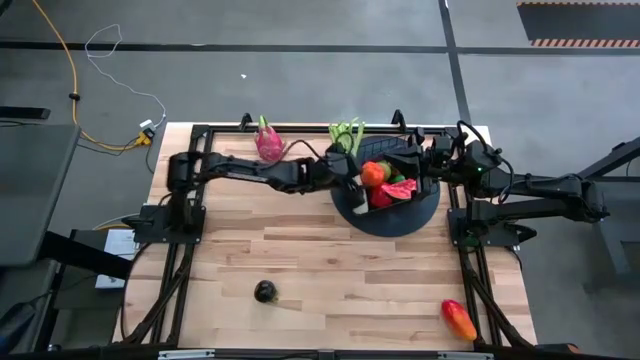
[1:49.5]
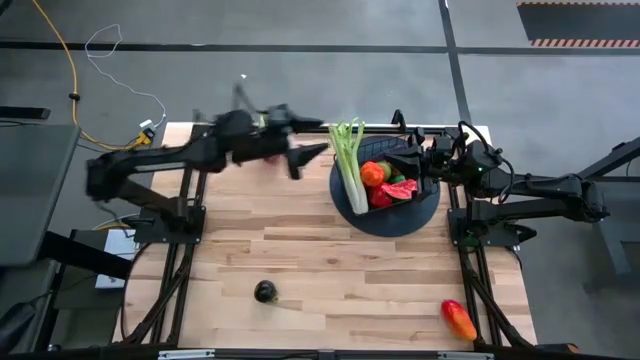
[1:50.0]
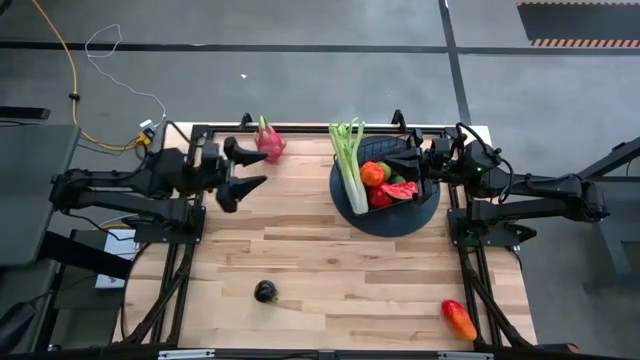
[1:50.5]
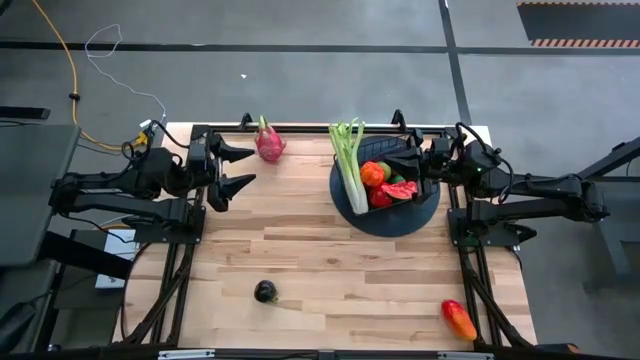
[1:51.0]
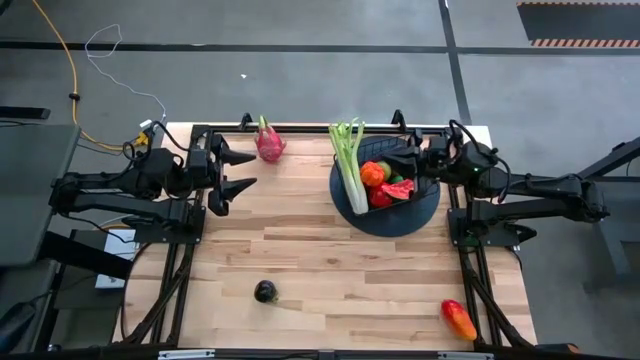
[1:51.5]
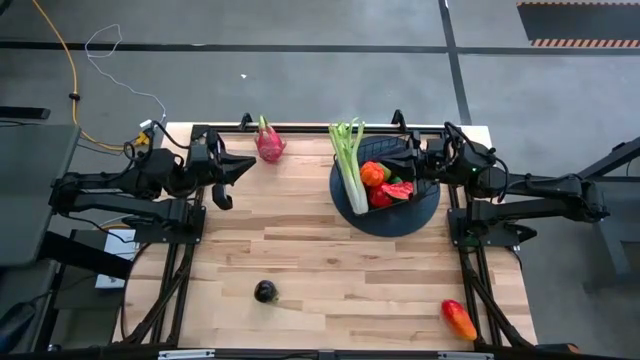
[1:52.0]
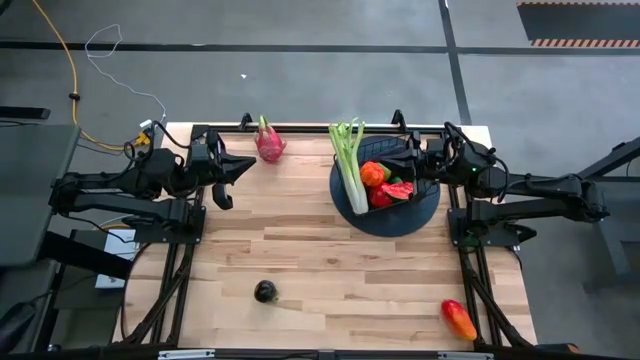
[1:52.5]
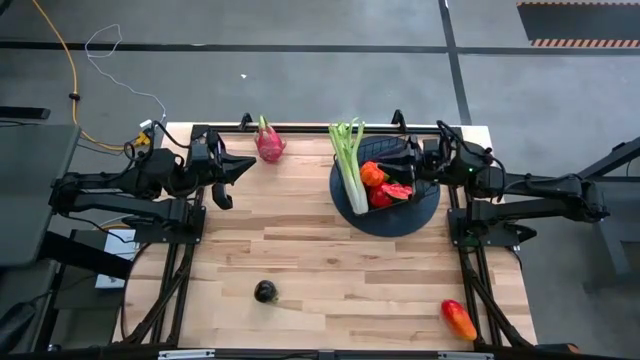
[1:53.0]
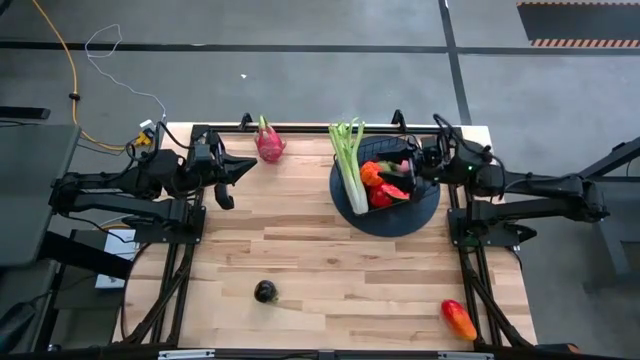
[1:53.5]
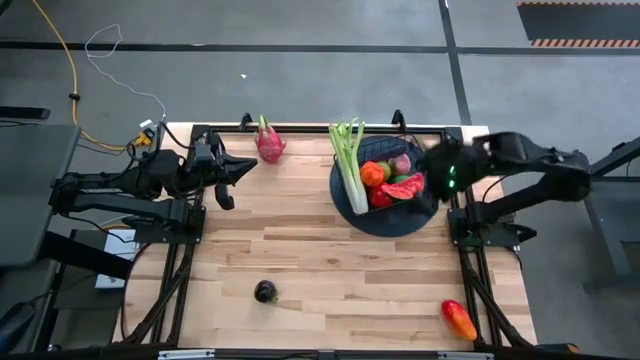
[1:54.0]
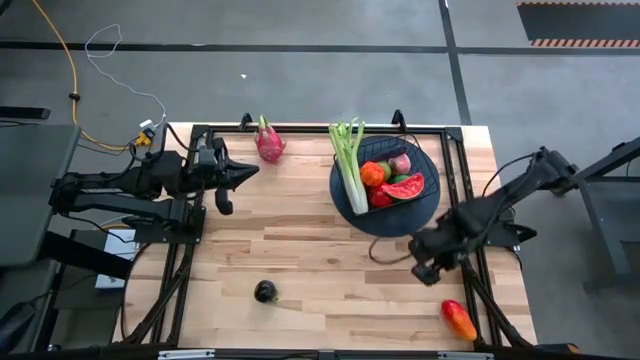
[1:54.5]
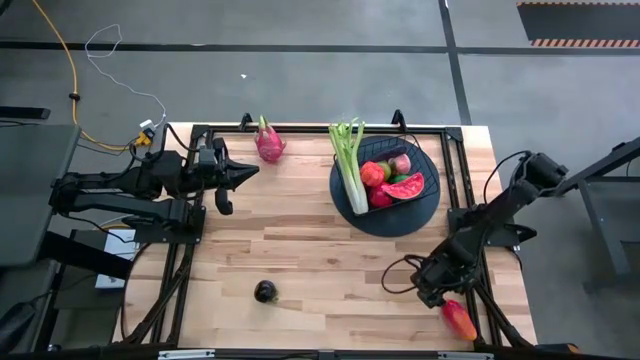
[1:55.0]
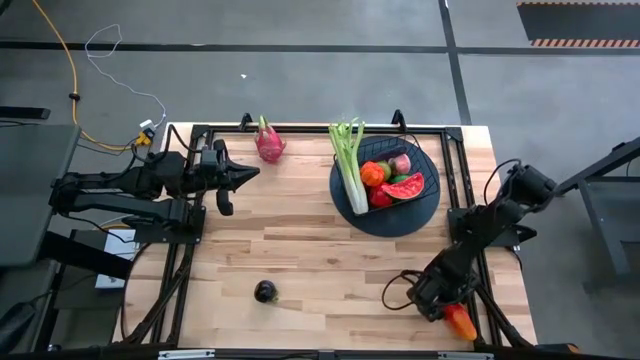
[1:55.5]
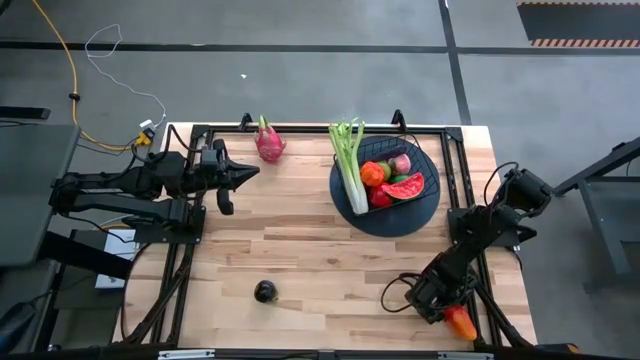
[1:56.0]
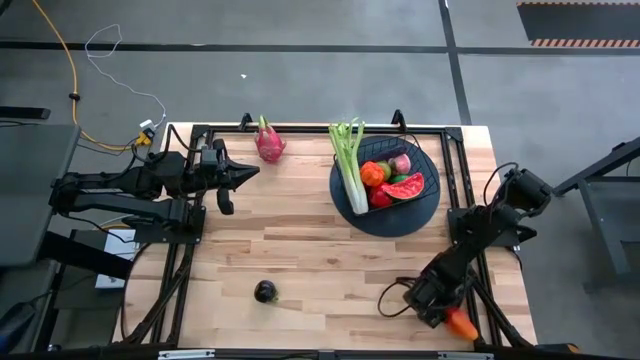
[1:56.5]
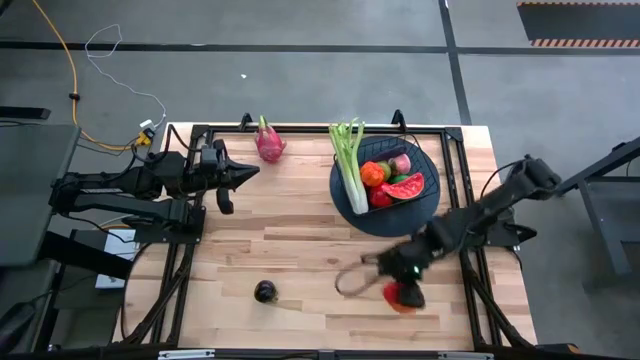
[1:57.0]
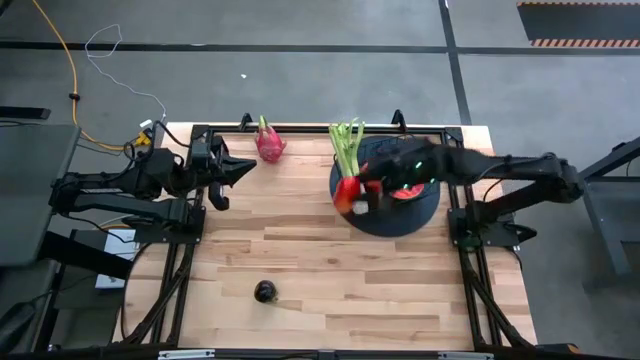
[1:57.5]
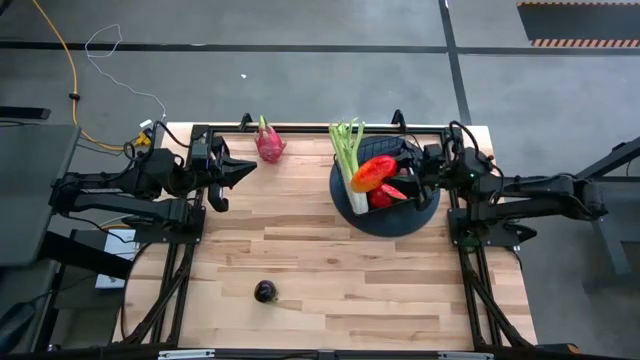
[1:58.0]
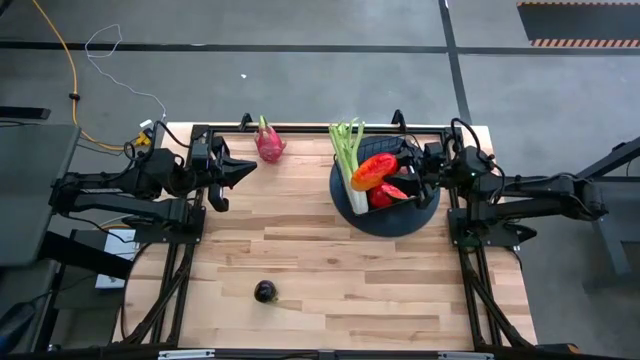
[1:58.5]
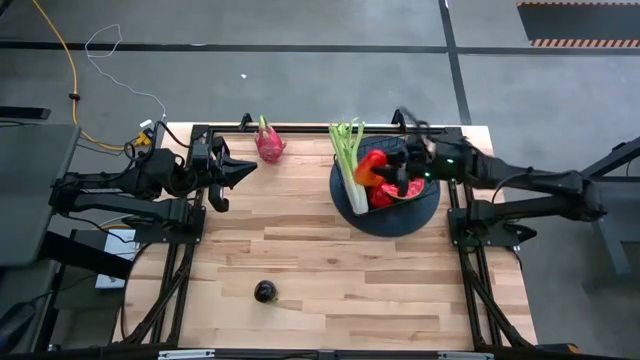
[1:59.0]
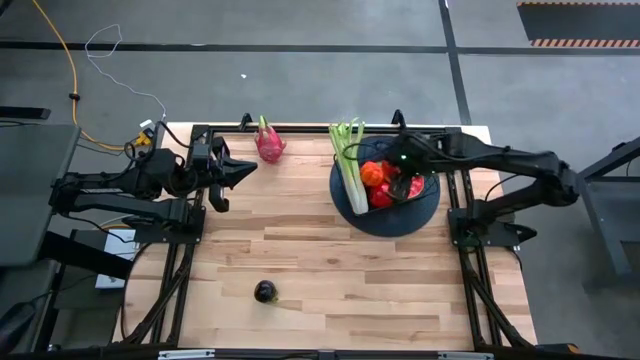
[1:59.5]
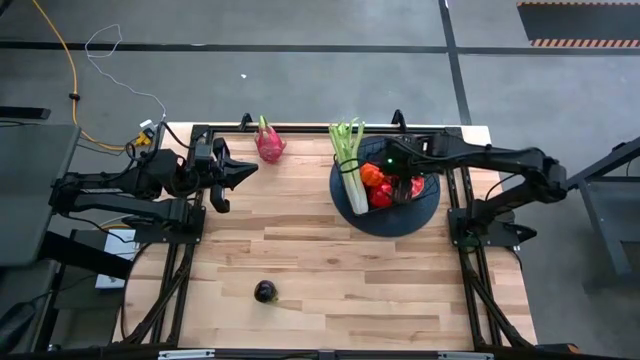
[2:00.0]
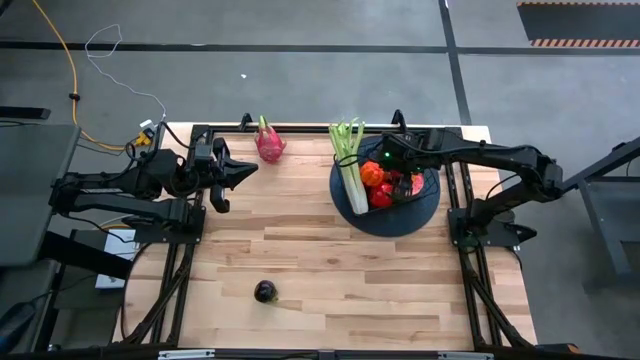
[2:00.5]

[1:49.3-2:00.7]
Task: Build produce basket
Put the mango into the wire basket

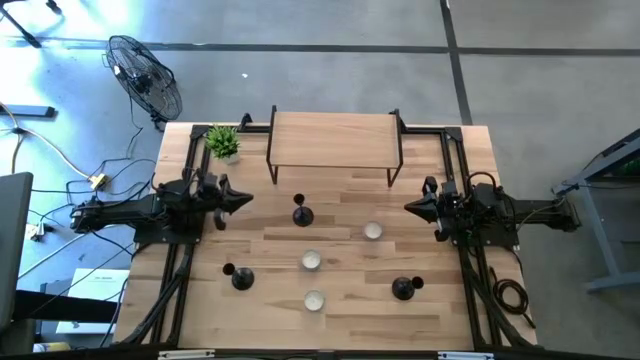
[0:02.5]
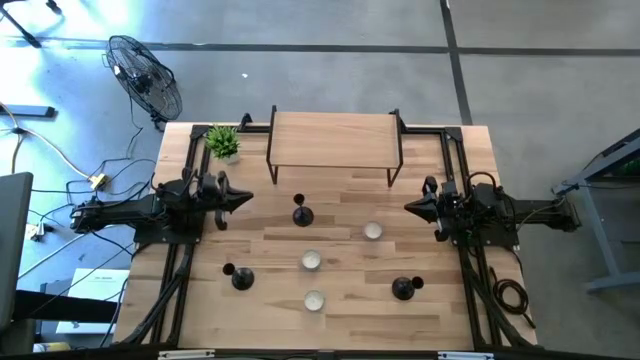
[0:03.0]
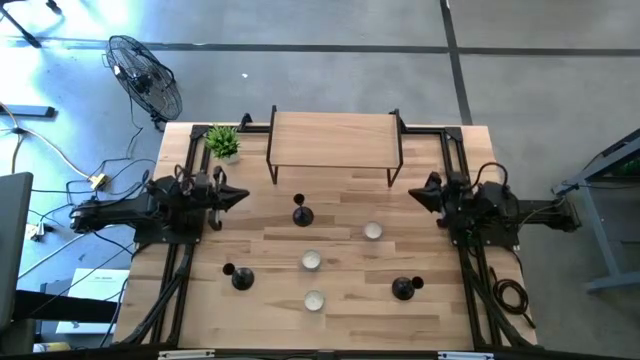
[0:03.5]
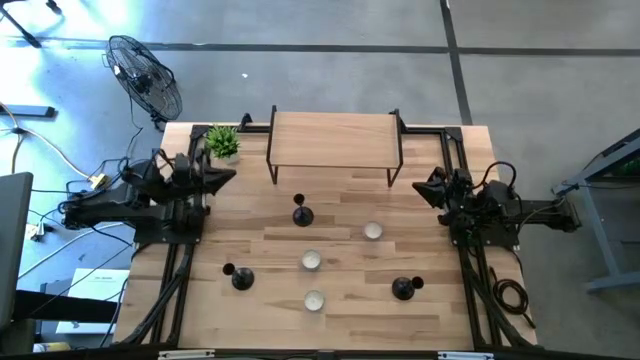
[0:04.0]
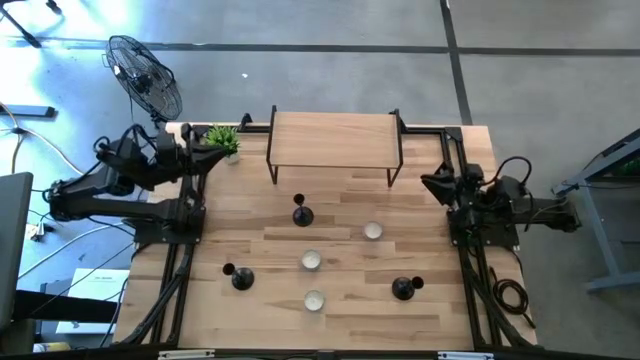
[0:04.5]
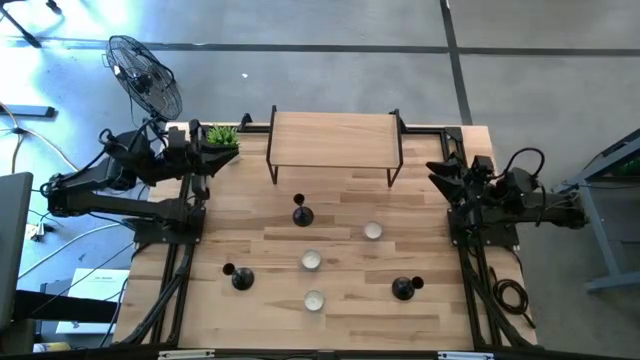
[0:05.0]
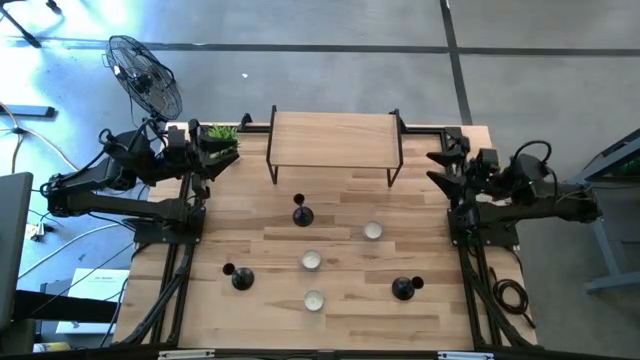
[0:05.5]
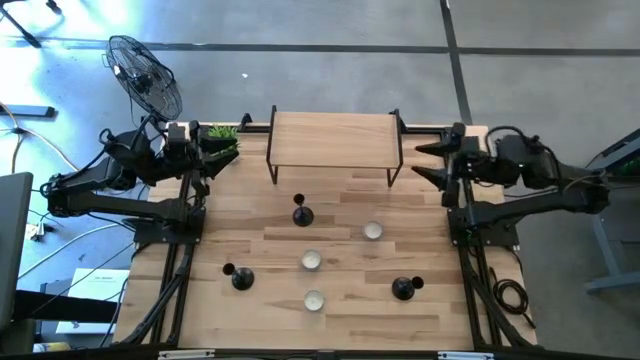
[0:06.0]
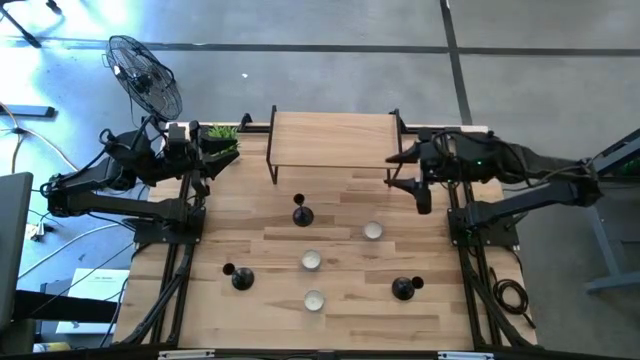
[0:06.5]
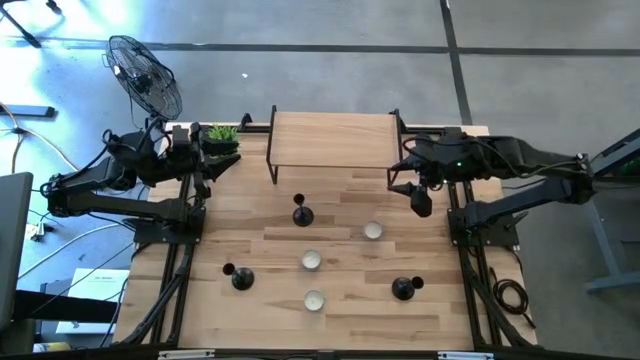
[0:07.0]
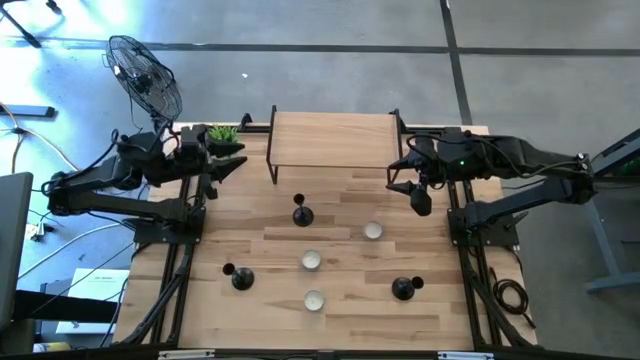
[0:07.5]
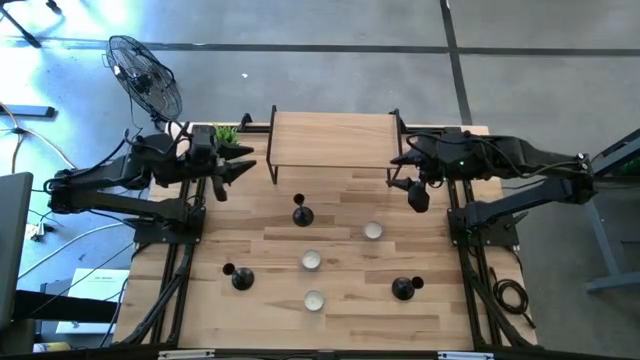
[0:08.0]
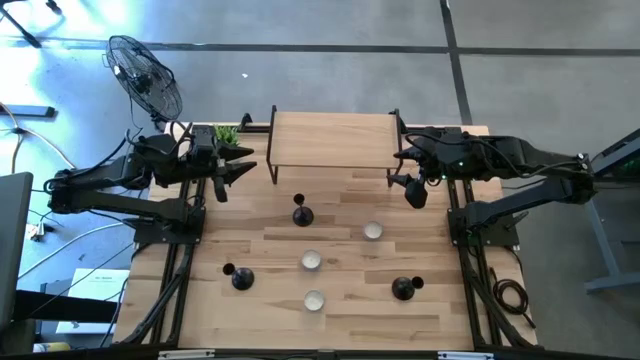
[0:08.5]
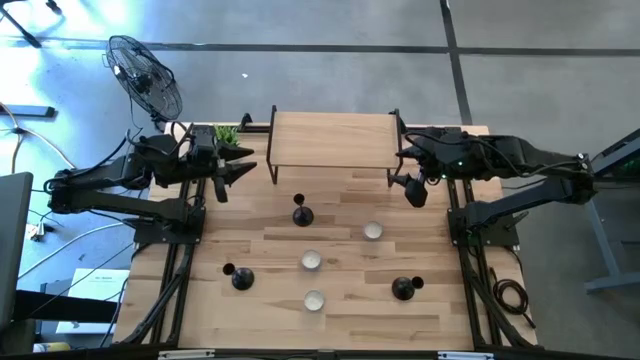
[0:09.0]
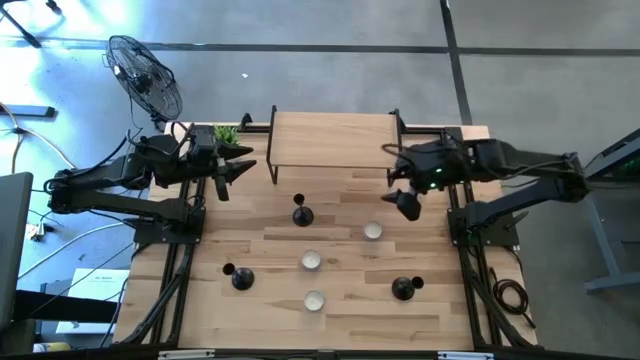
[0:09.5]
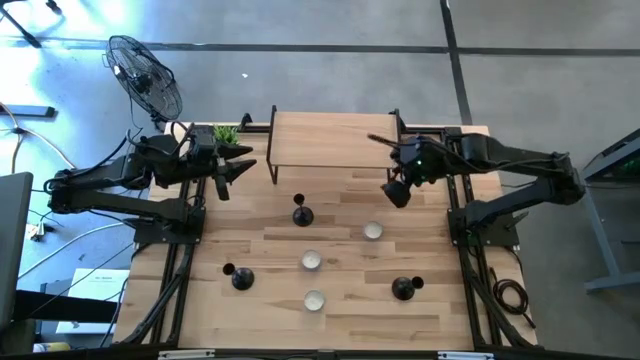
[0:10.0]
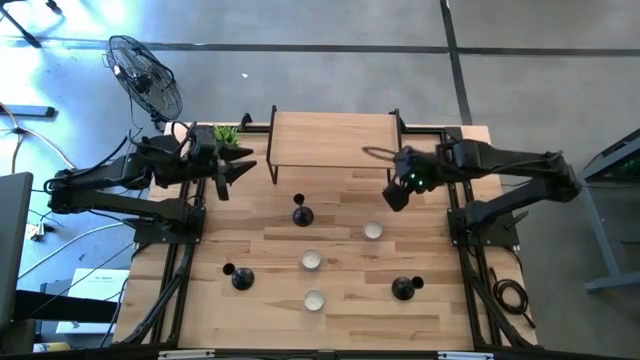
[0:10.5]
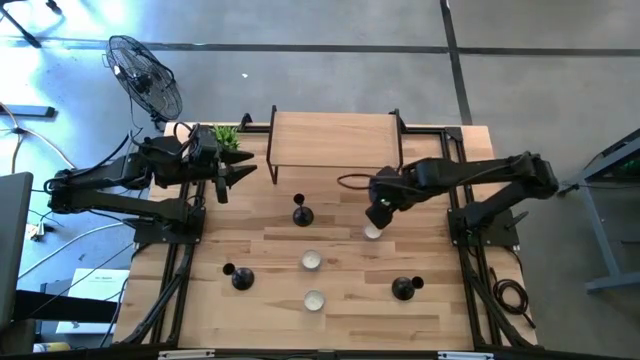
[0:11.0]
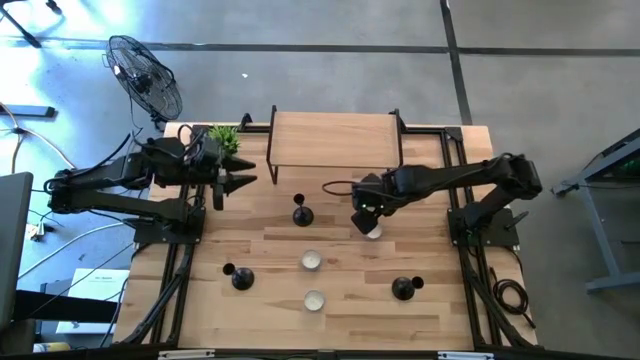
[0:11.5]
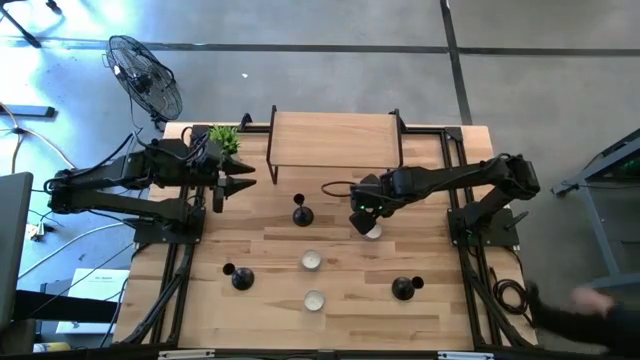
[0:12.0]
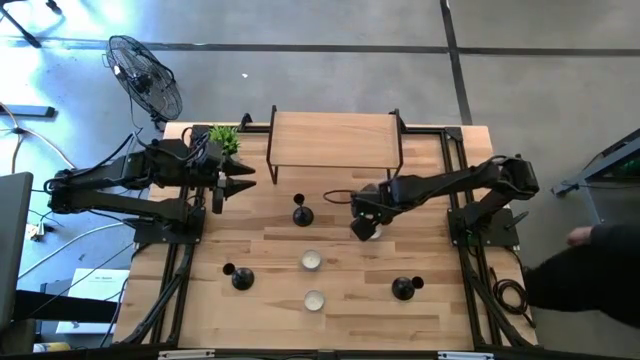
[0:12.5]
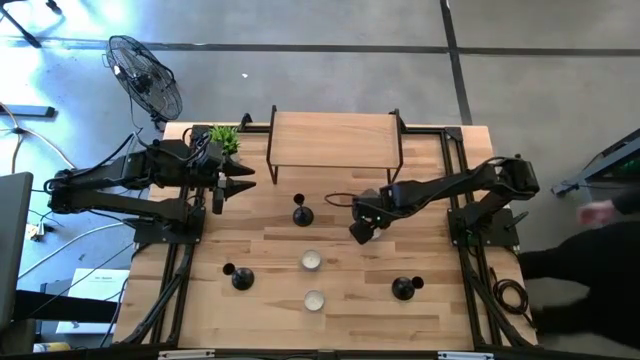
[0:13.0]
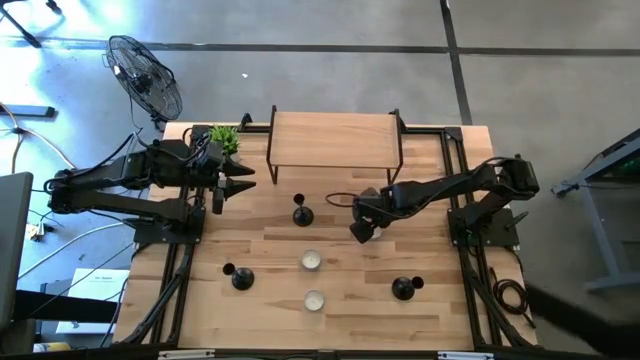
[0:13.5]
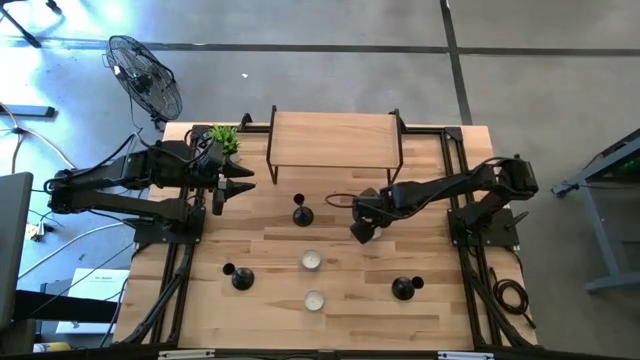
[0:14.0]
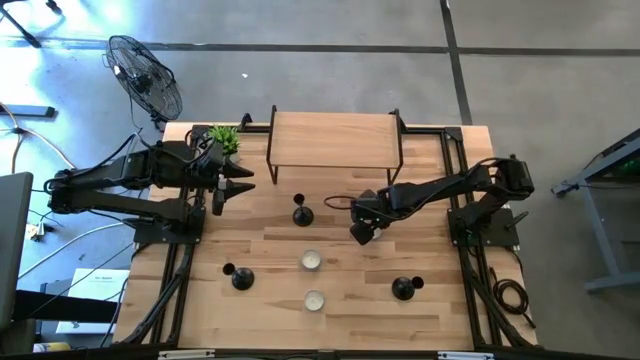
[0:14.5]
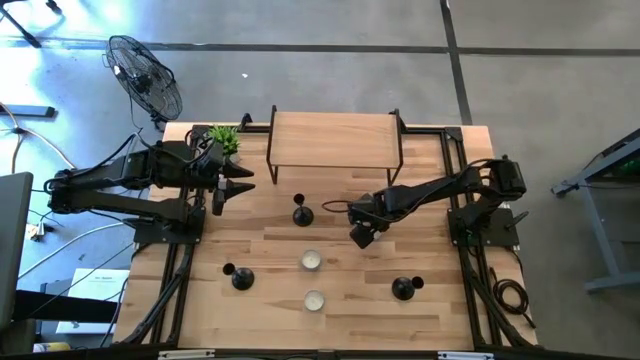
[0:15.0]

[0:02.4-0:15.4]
Task: Pick & Place candle stick holders
Put the top red patterned scented candle on the shelf
